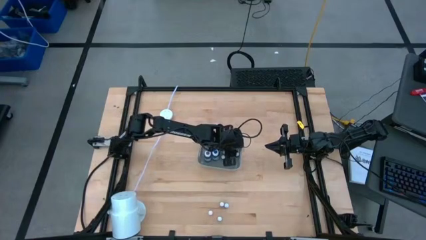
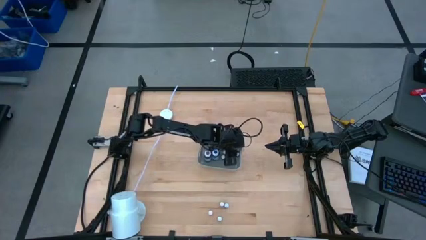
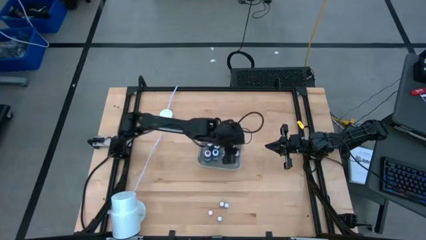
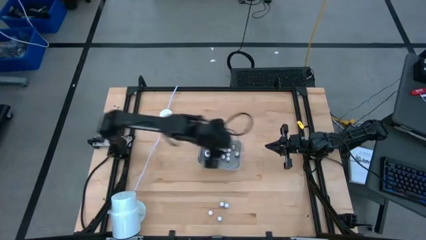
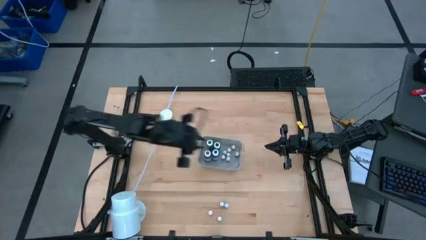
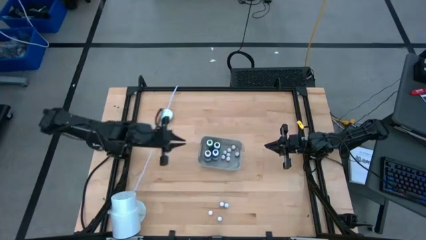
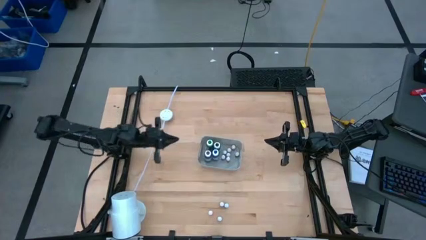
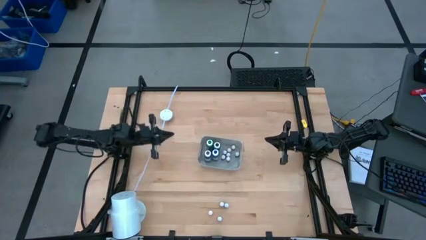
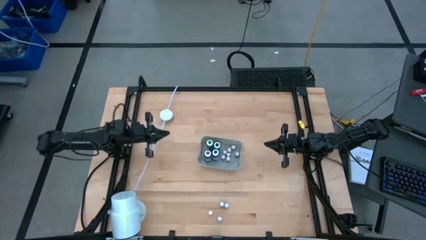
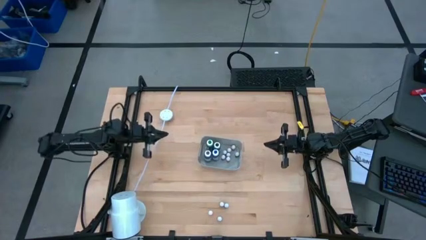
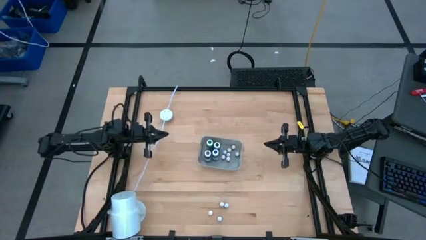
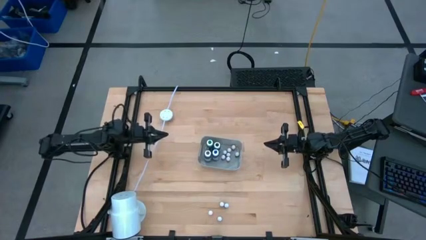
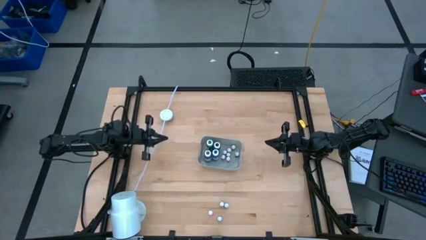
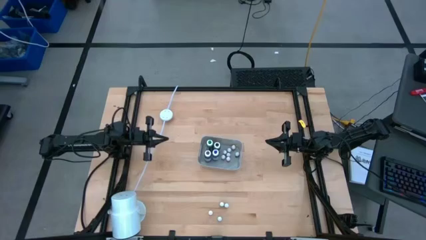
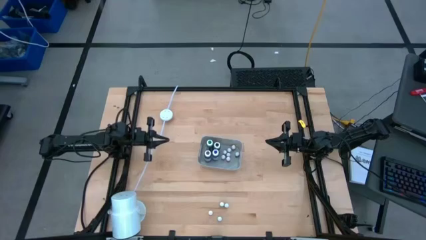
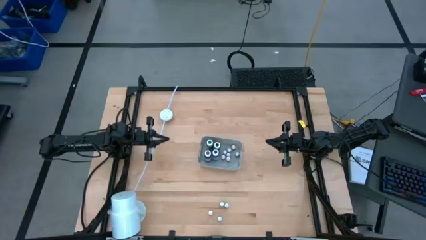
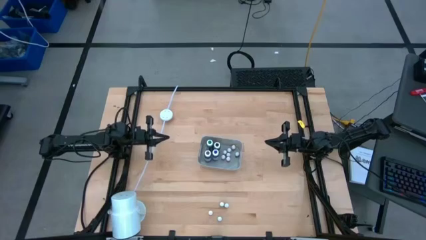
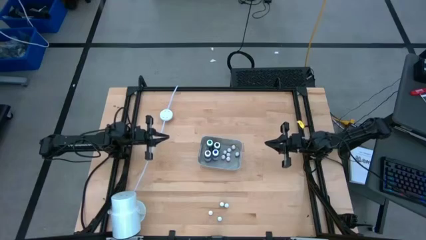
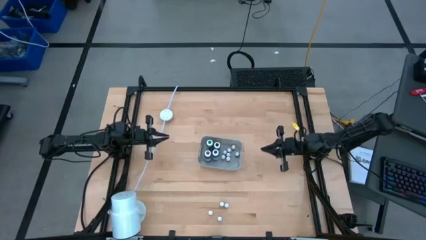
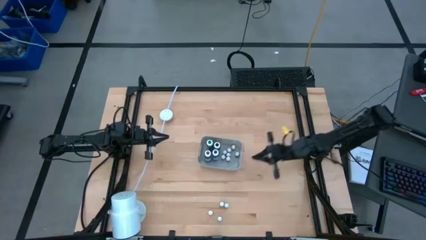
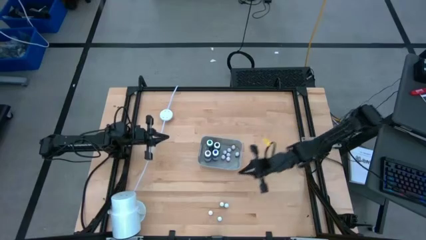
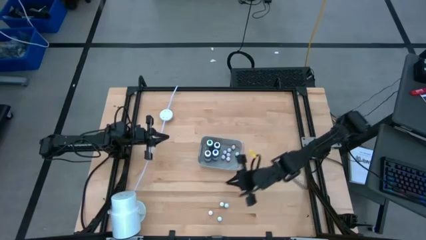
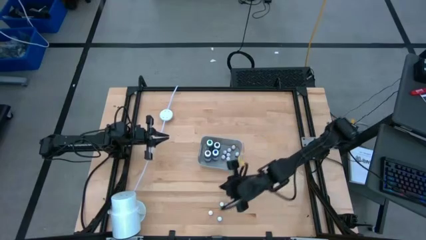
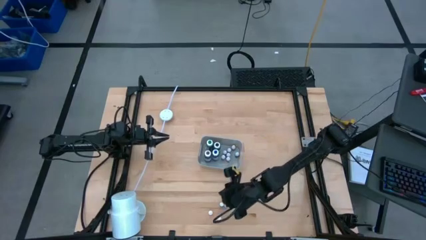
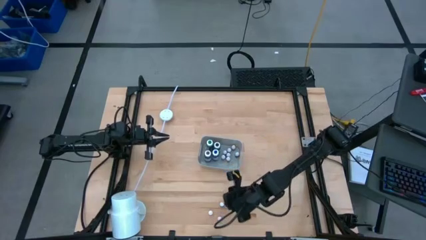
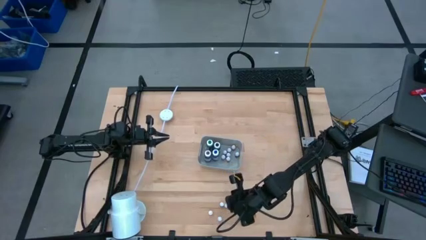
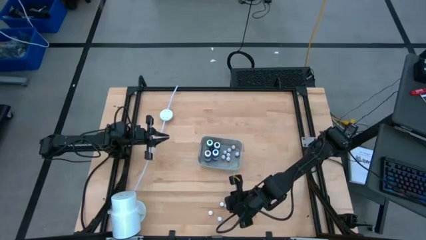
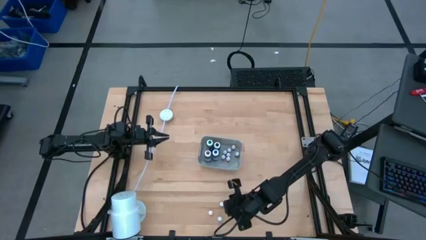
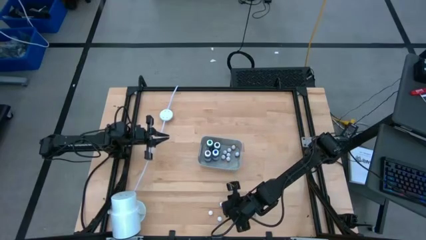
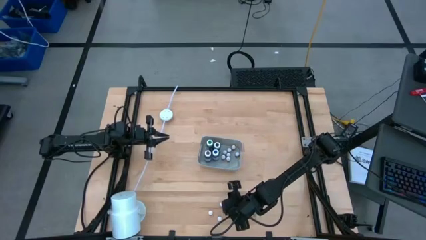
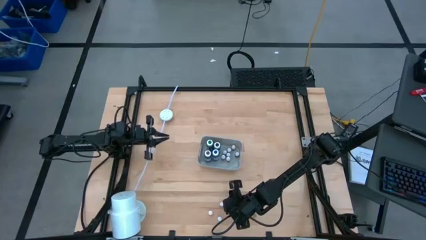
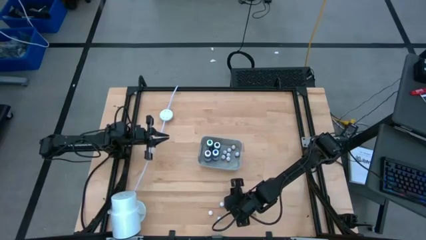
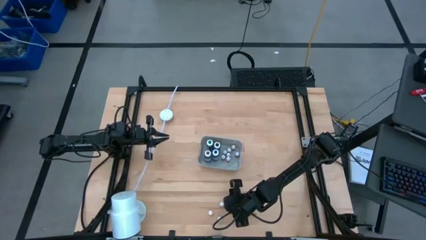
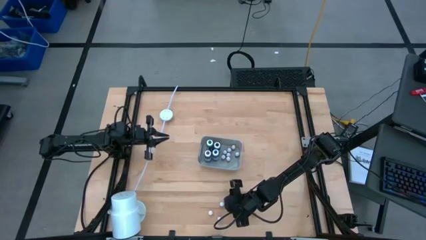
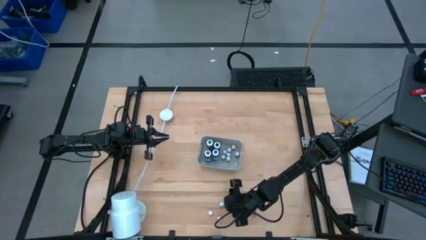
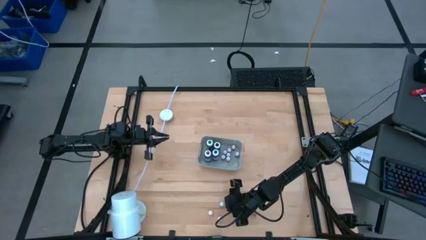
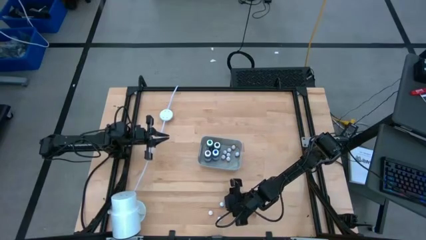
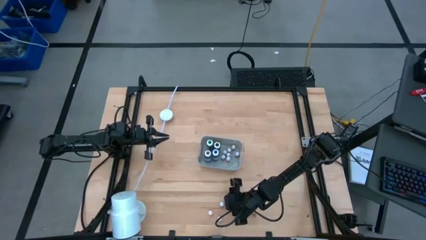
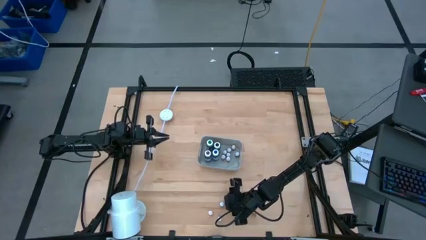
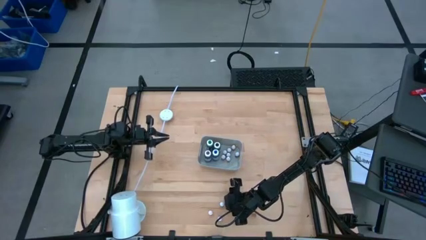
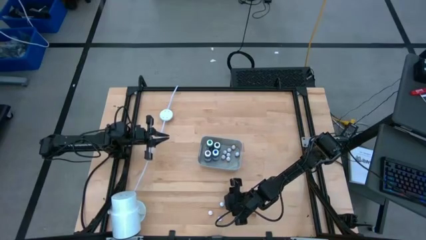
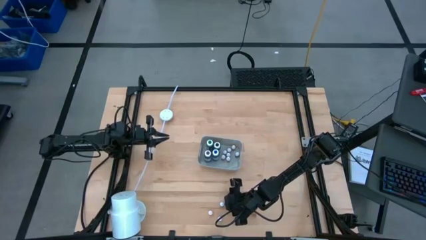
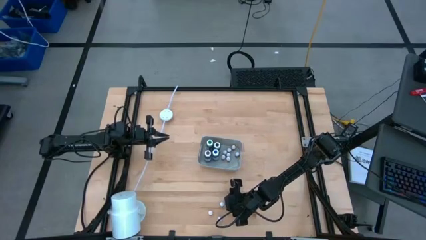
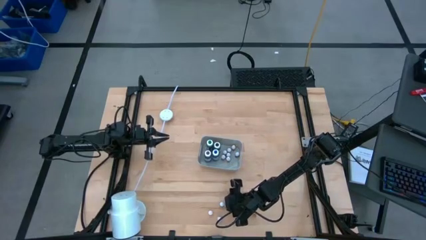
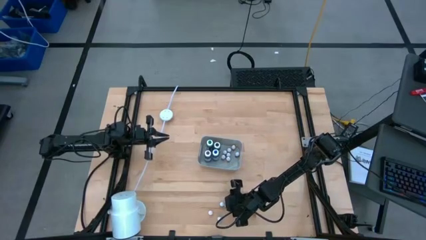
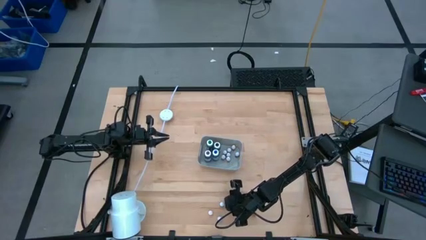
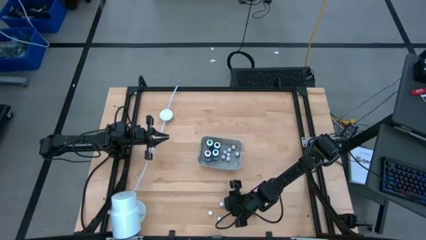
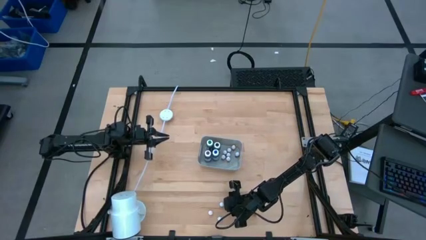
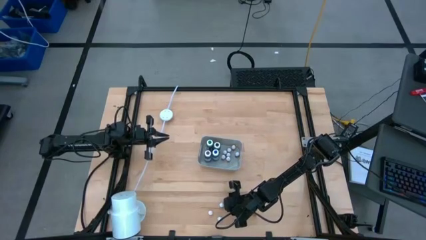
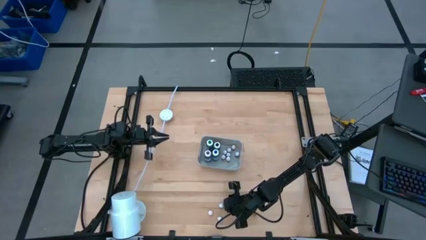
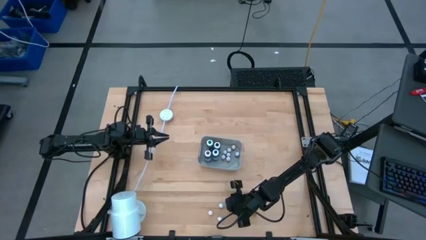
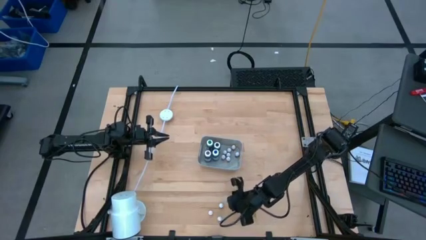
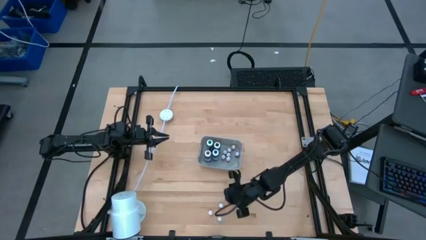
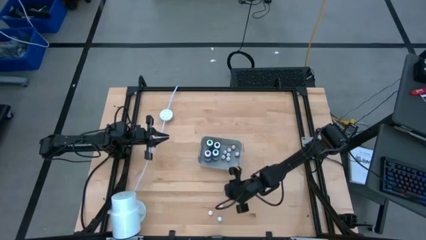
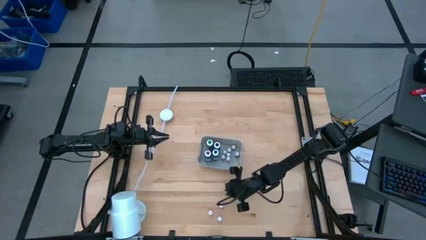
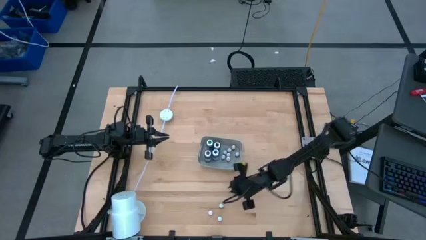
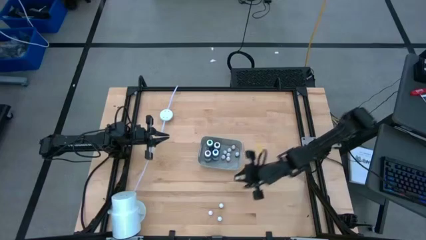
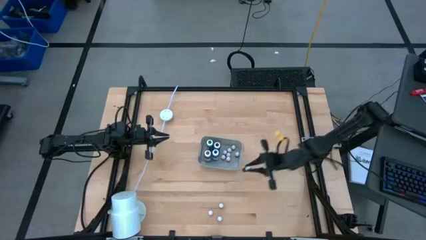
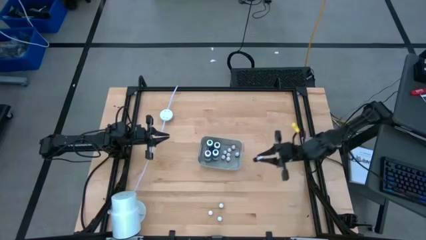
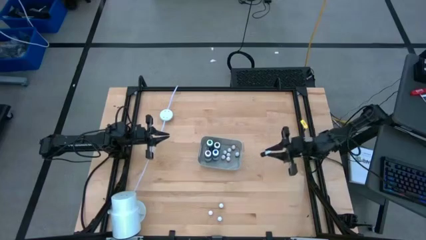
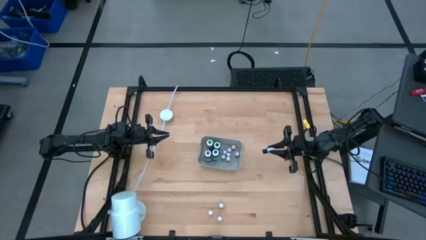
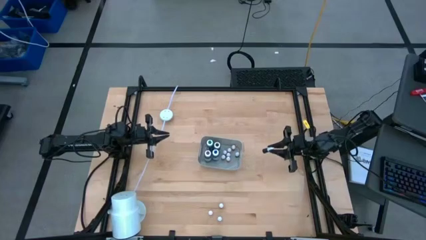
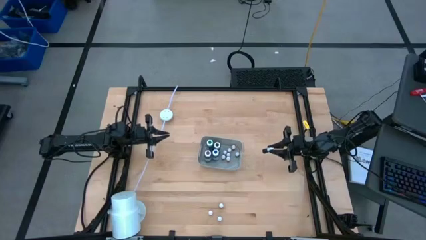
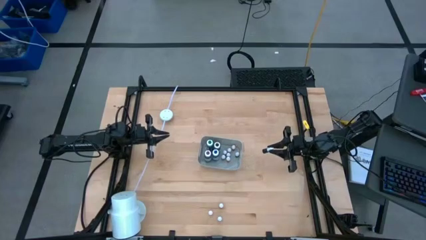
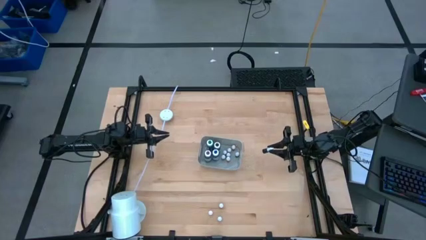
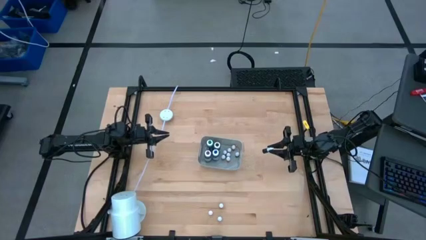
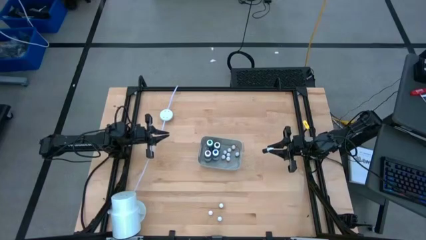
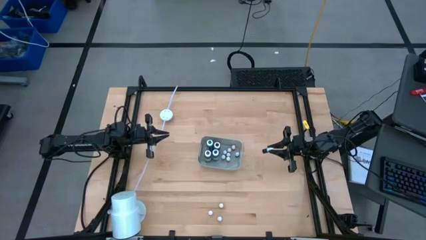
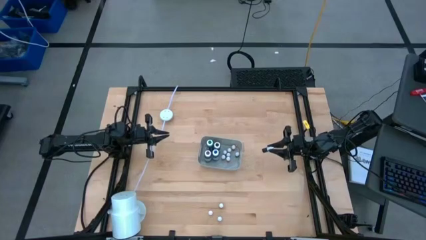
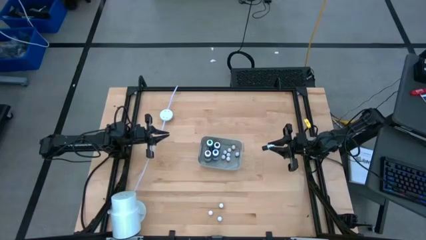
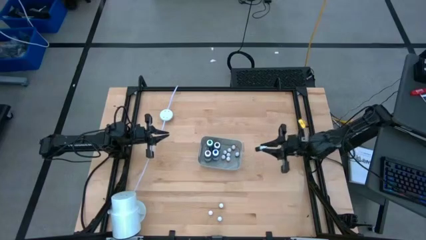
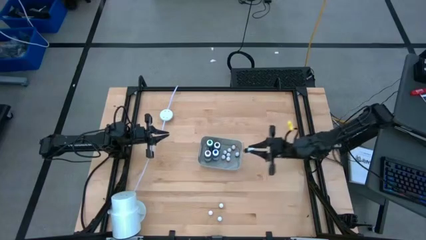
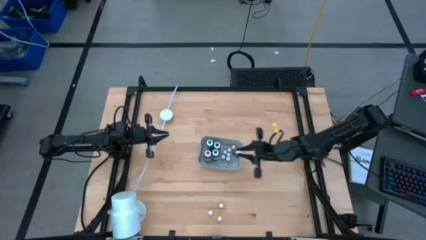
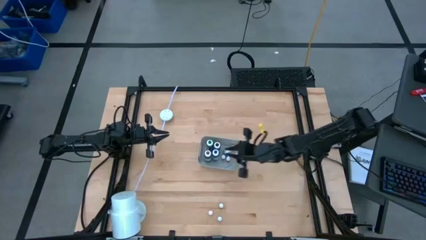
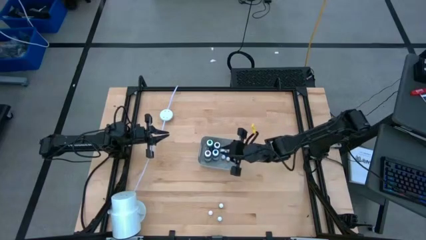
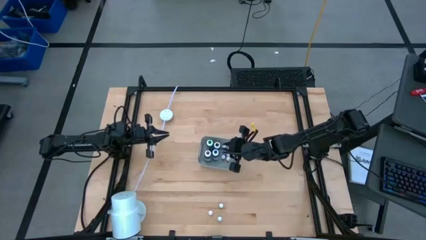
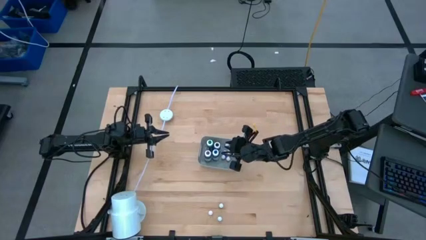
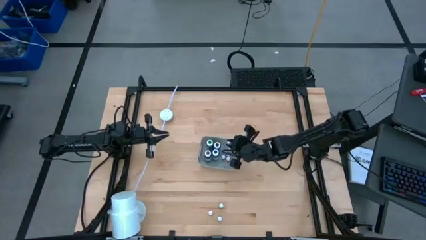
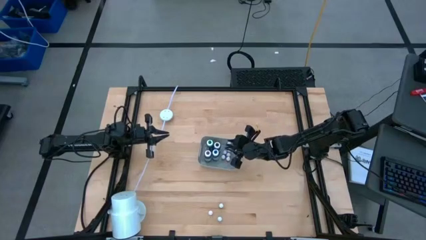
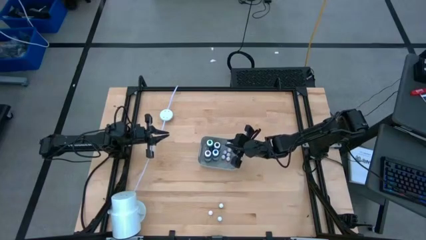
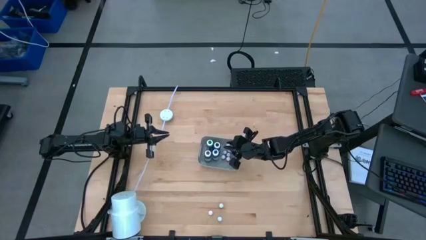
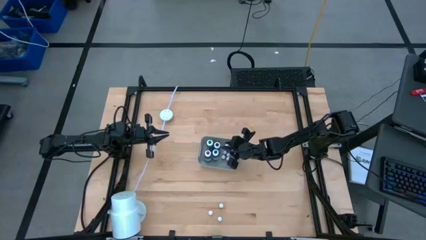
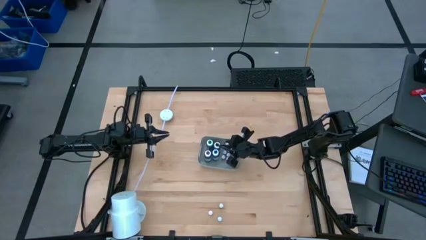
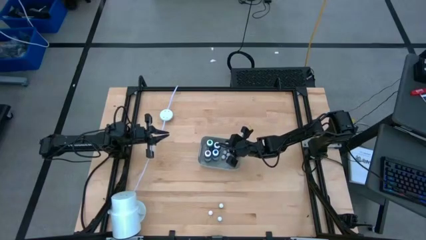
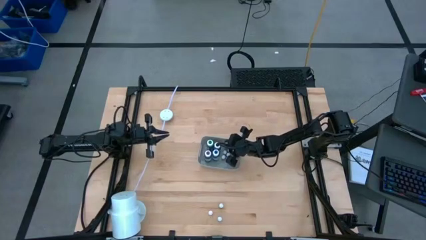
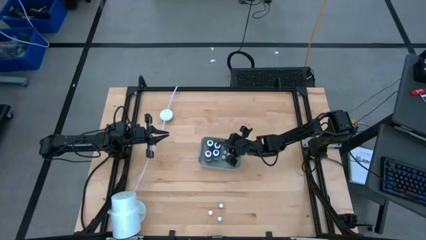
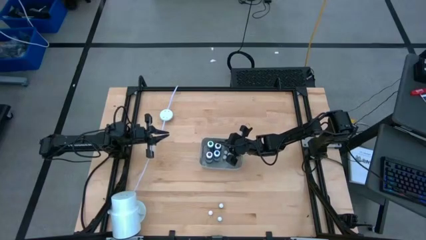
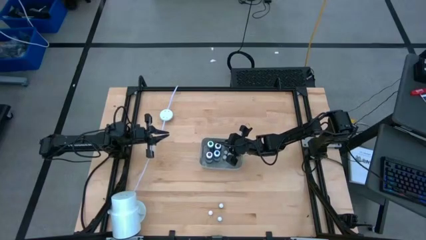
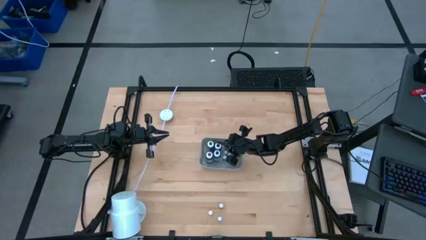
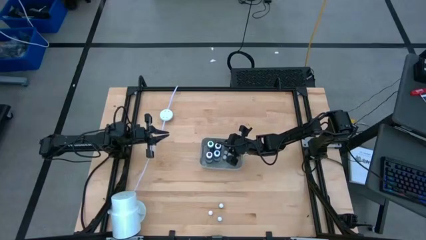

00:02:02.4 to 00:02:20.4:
Task: Pick & Place food coloring
Put the small green food coloring bottle into the gray container
